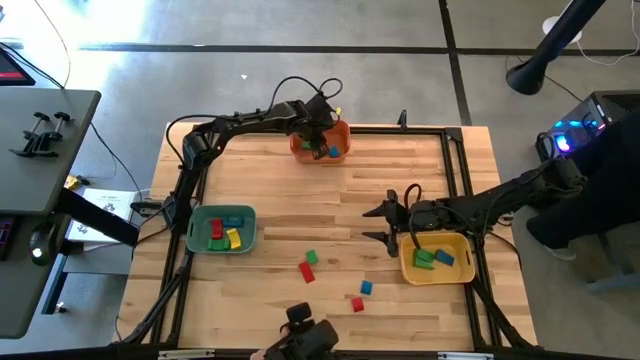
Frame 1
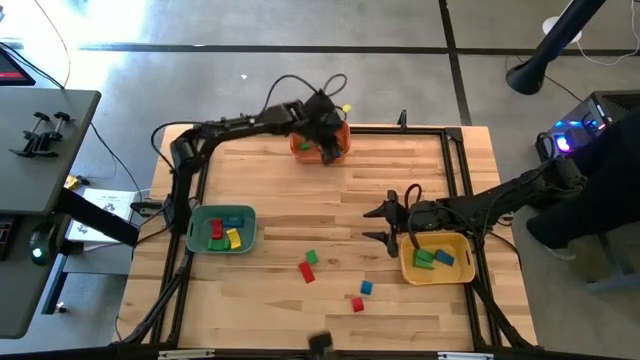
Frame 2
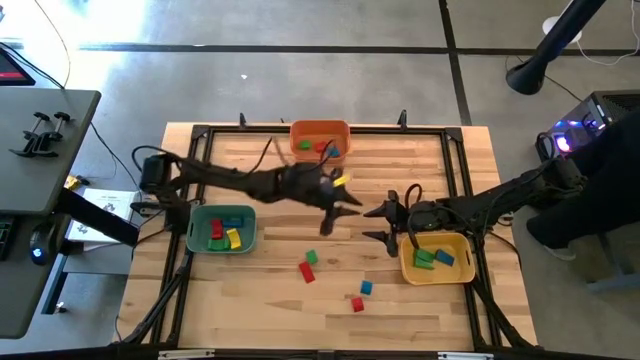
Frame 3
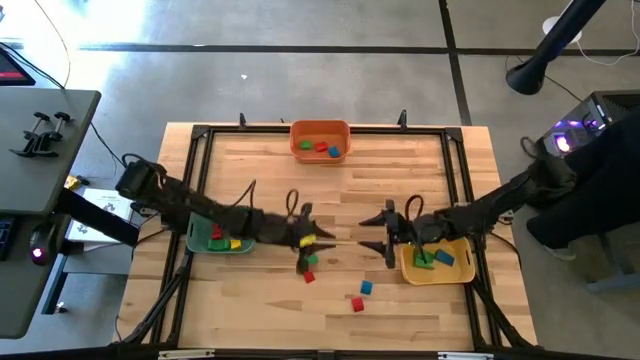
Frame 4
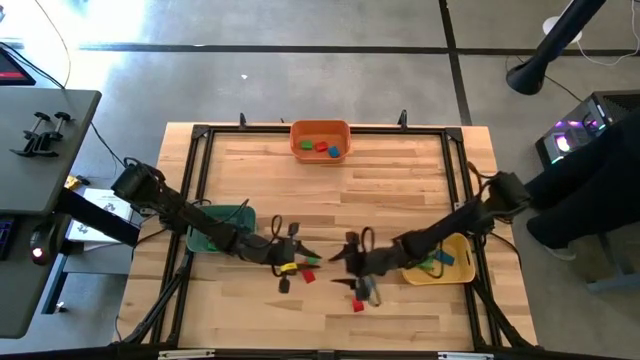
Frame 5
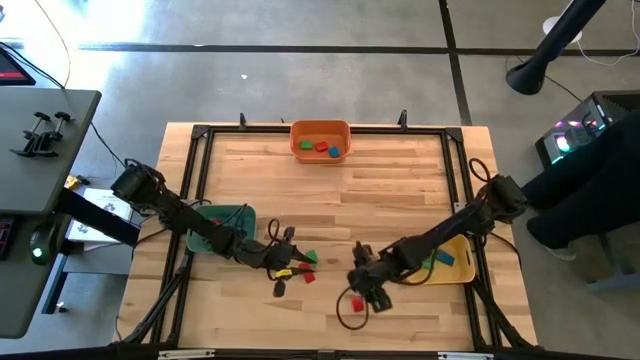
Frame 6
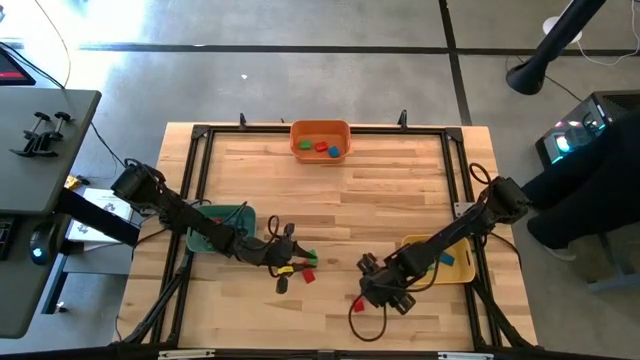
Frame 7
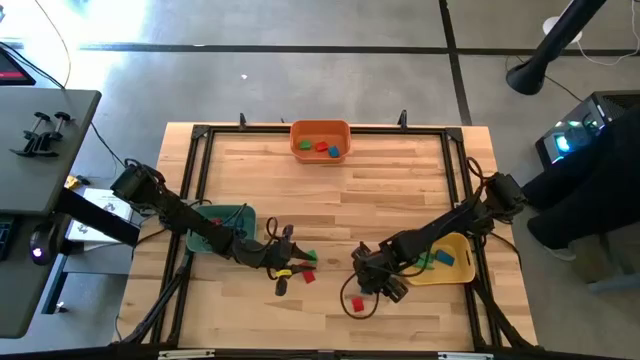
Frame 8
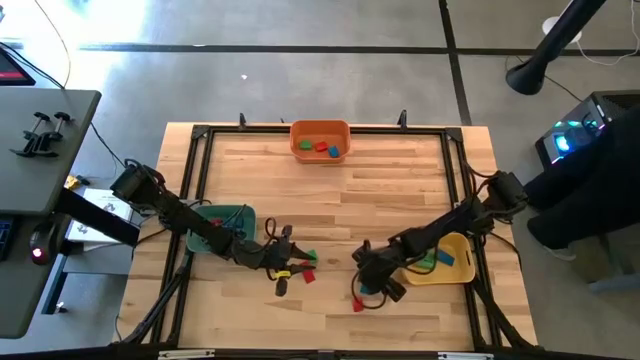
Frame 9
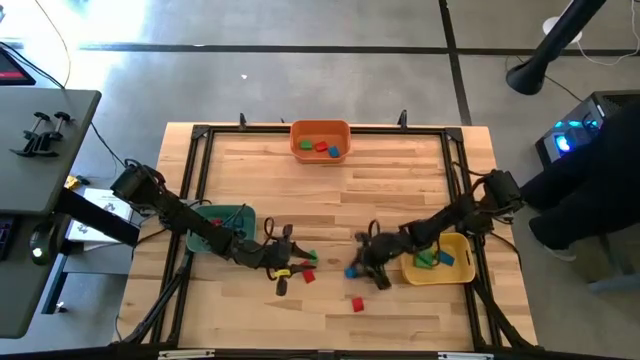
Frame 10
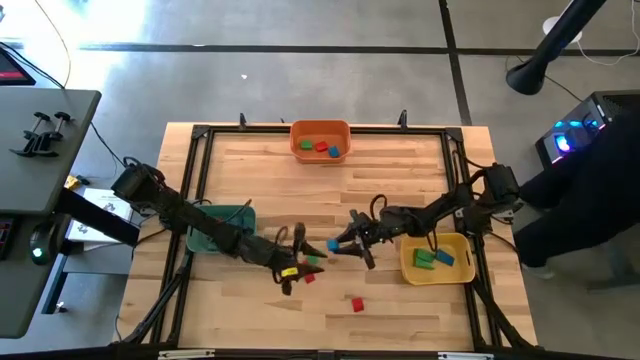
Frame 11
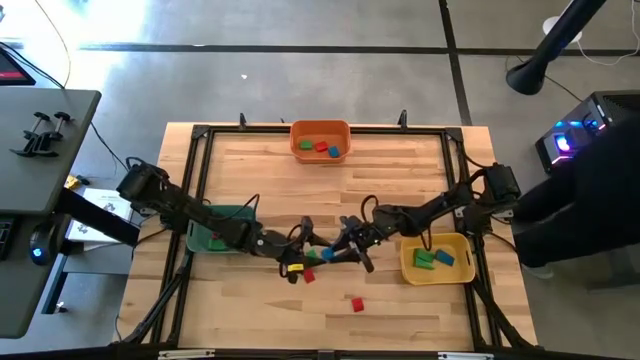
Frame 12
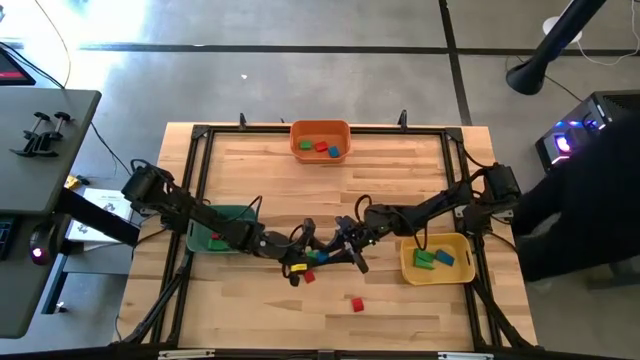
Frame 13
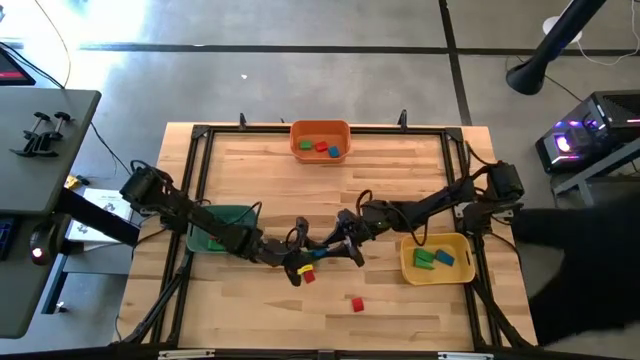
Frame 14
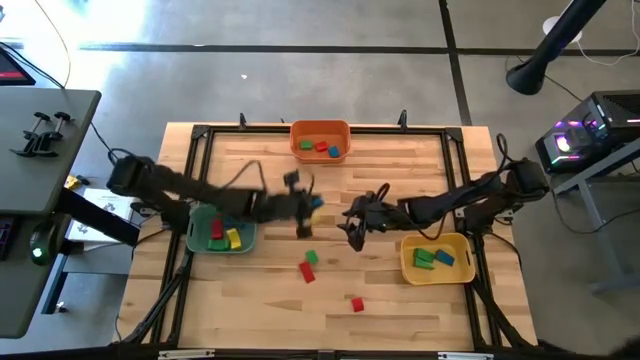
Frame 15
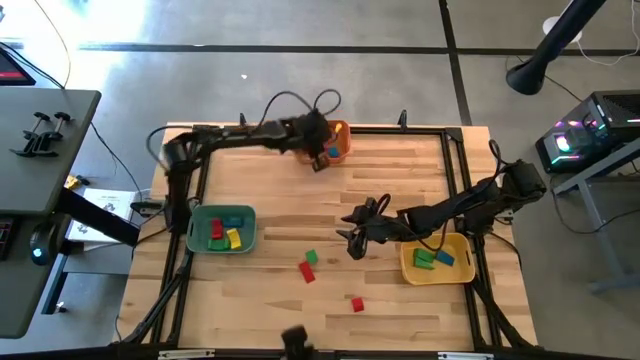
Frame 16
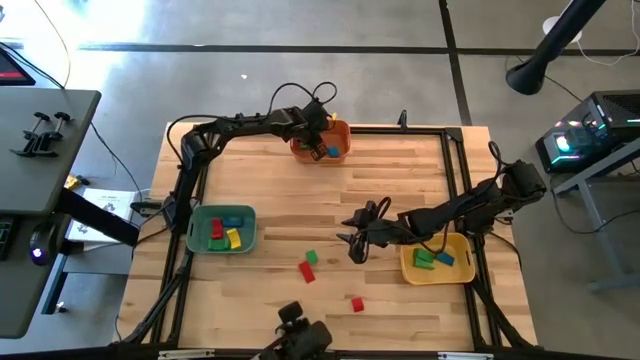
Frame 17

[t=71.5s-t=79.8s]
Task: Sort blocks by size
Put the blue half cylindrical block into the orange bin

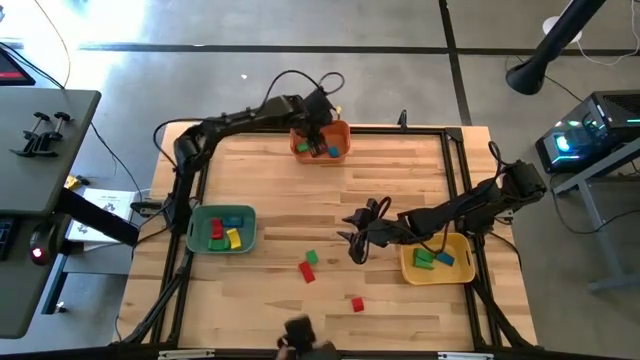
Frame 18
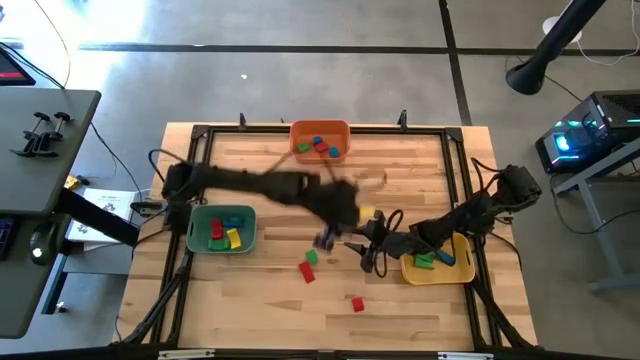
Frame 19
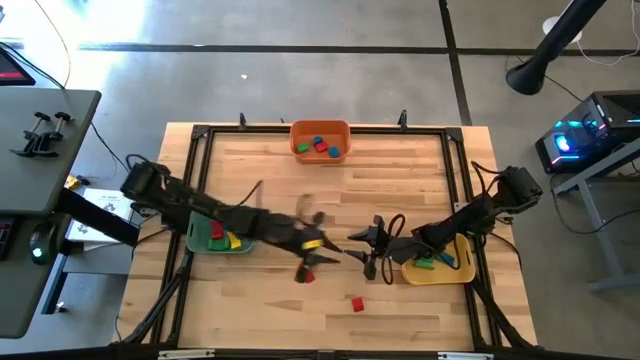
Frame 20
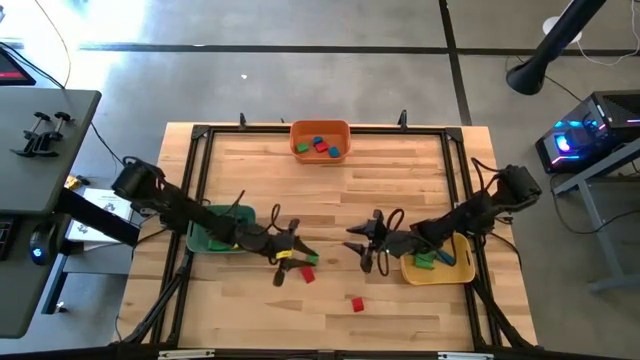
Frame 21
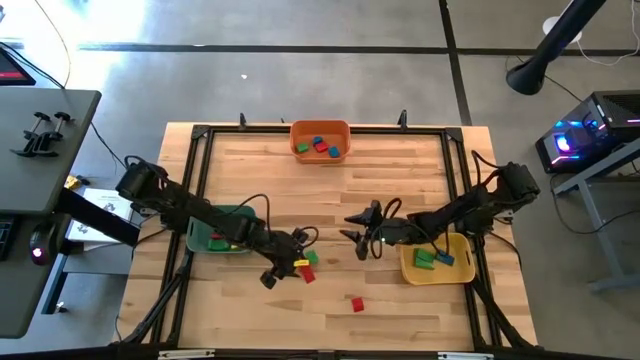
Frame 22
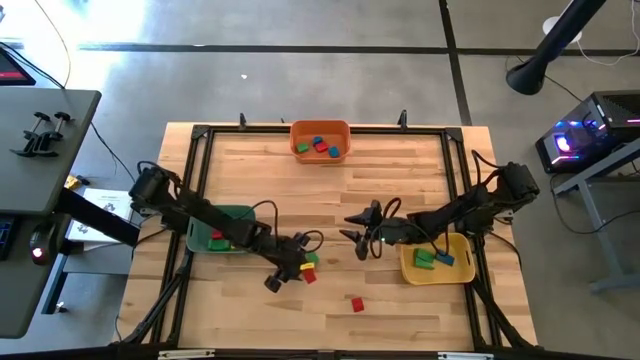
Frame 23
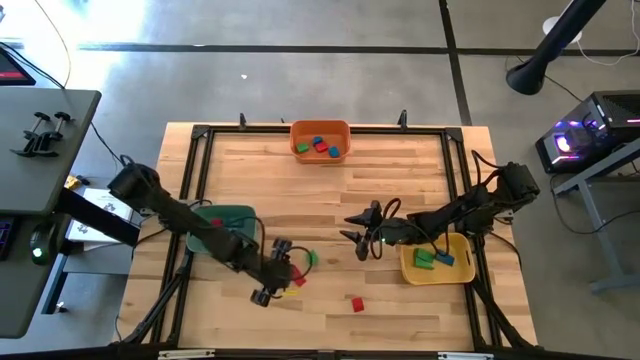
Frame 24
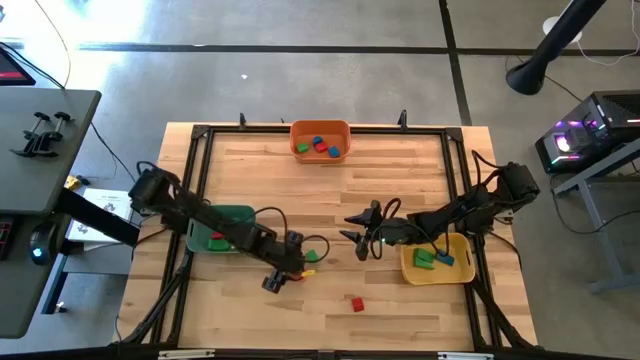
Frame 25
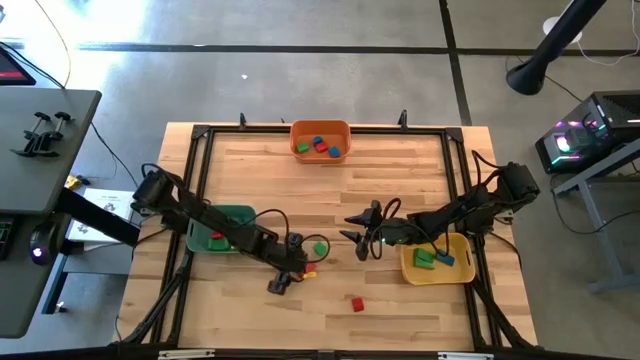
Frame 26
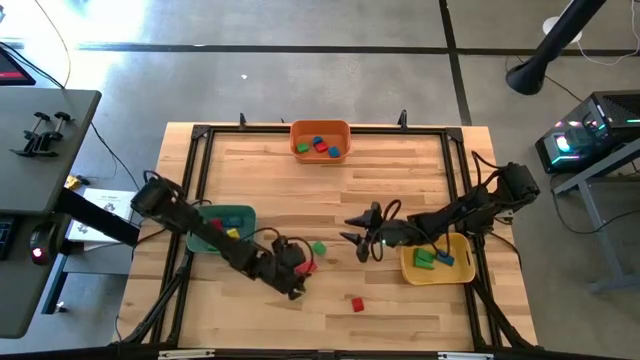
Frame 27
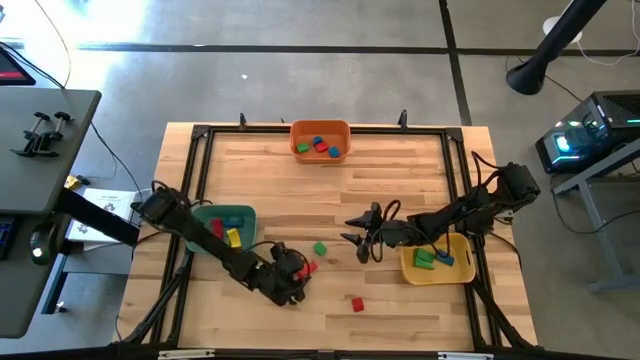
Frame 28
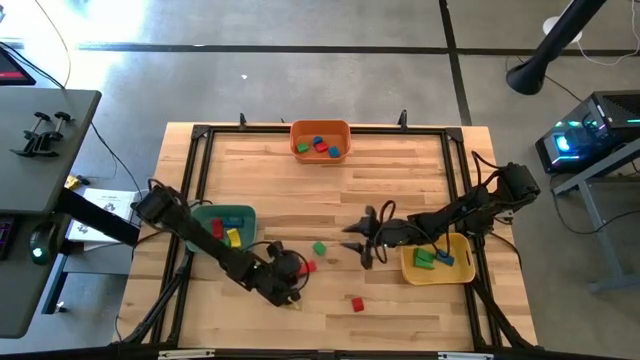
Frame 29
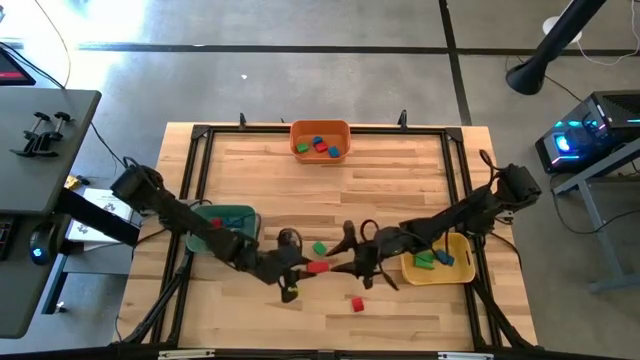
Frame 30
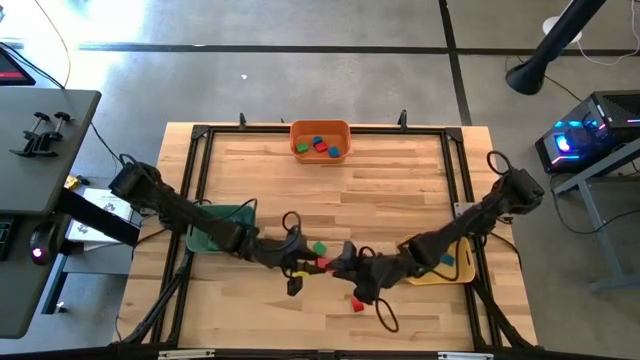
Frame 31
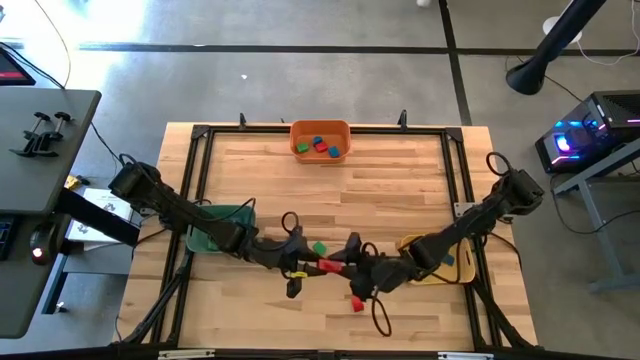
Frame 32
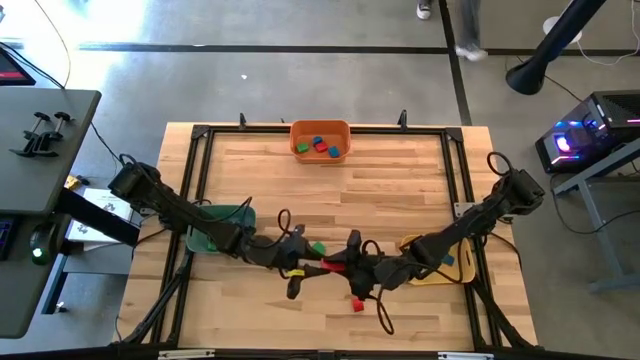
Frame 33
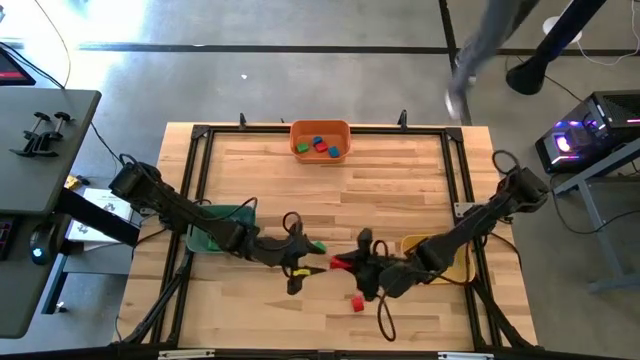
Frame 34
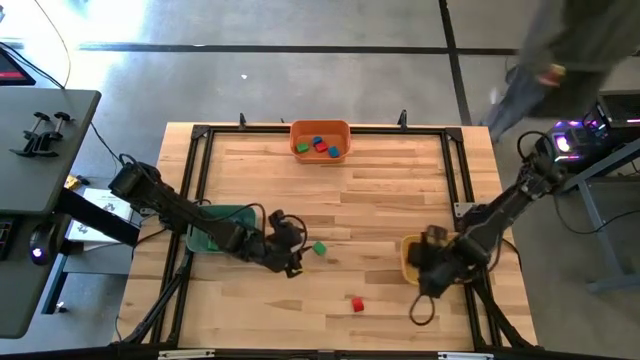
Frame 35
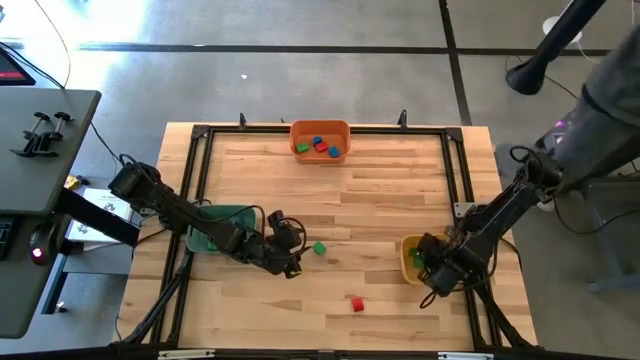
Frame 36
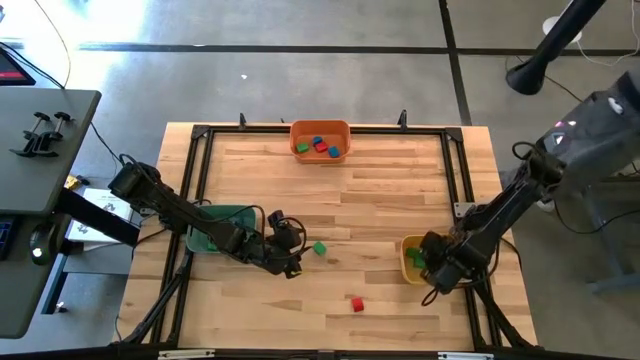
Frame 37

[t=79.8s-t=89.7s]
Put the red triangle block into the yellow bin

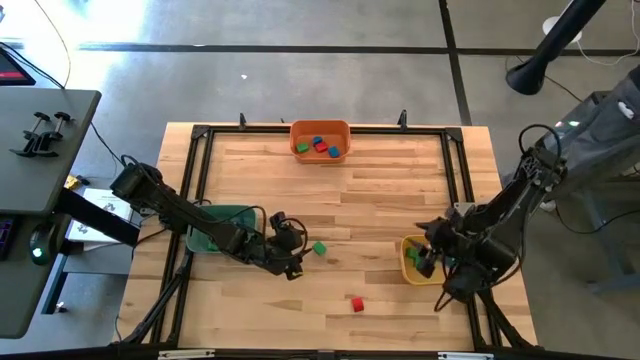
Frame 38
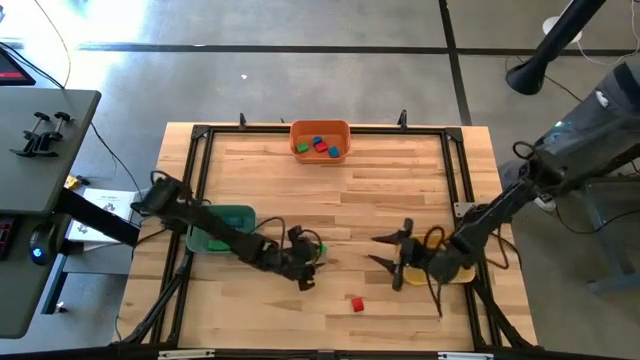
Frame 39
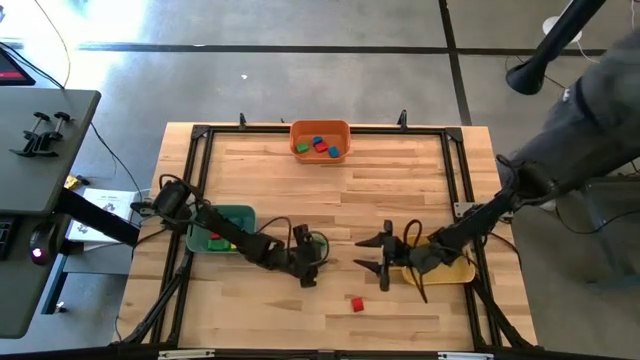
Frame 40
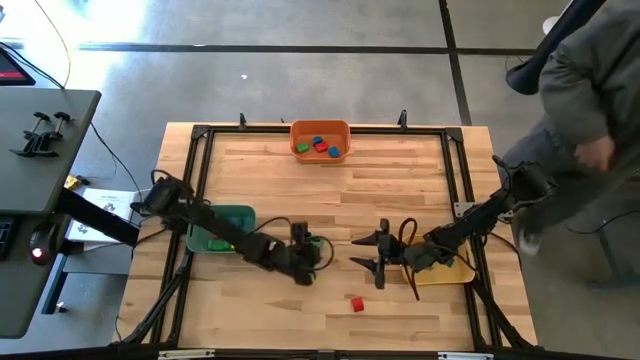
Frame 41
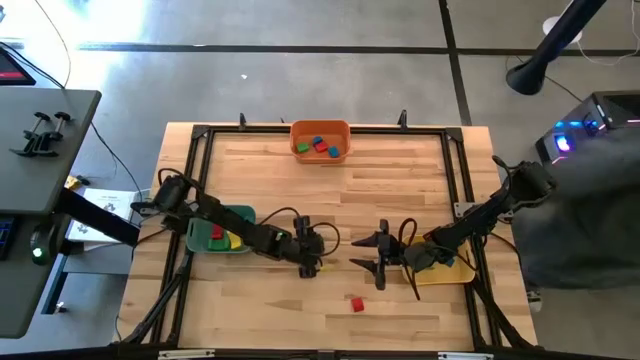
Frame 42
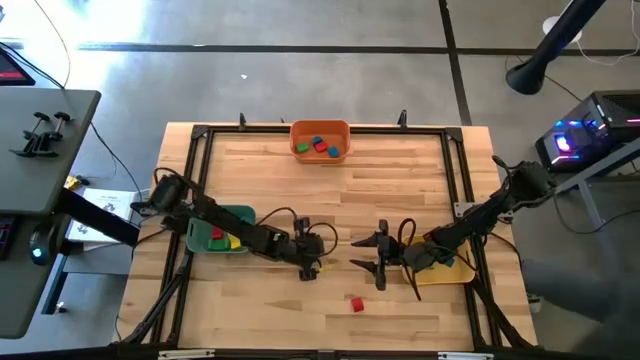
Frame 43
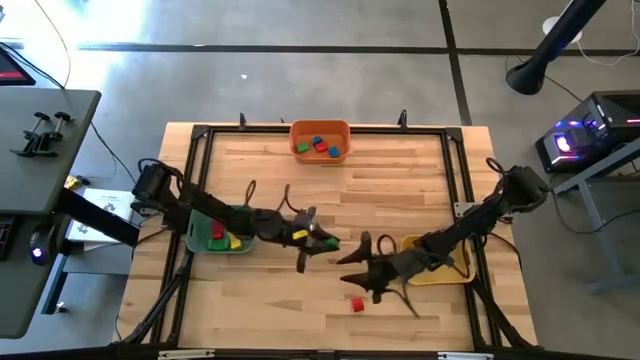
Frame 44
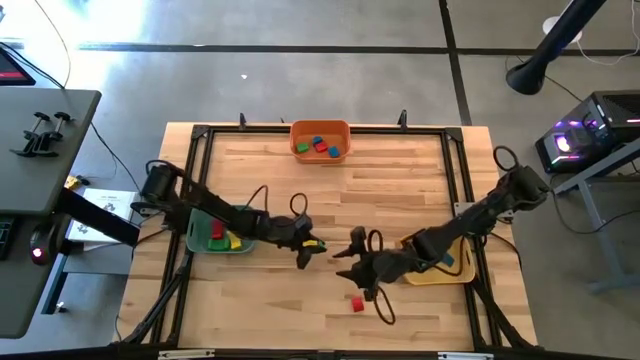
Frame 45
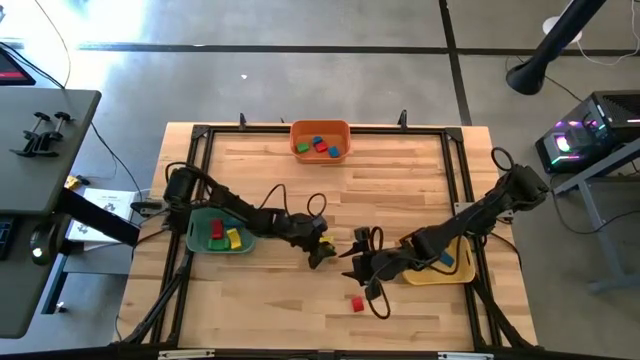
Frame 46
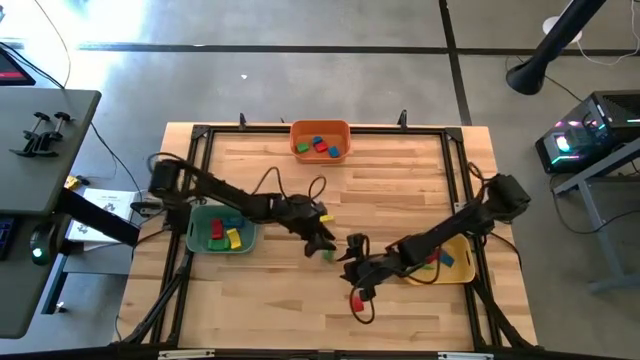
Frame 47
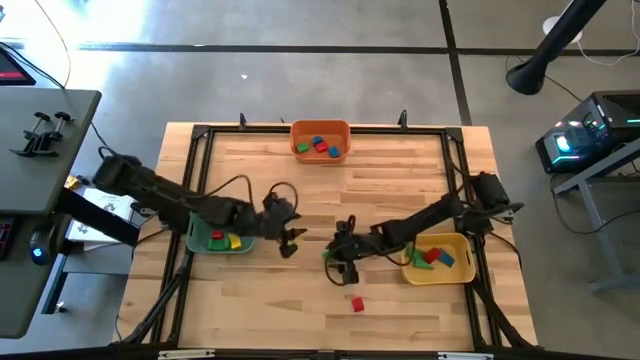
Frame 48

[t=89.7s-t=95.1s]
Put the green half cylindrical block into the orange bin
